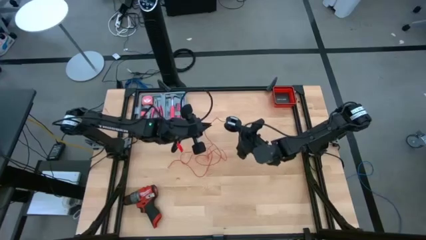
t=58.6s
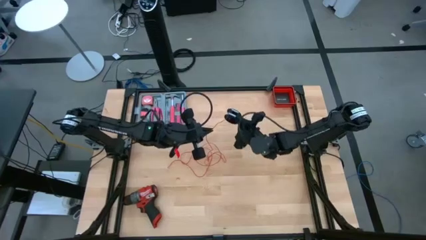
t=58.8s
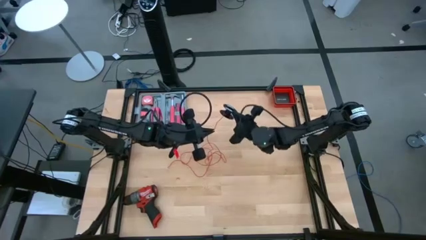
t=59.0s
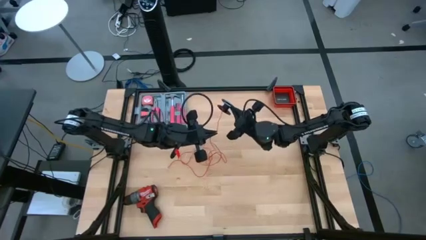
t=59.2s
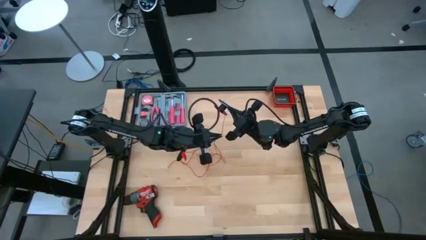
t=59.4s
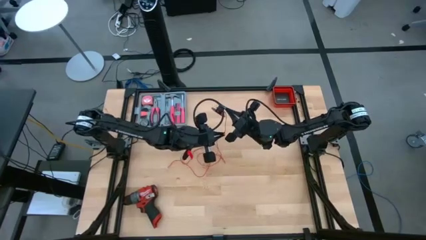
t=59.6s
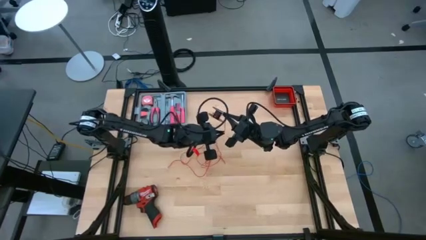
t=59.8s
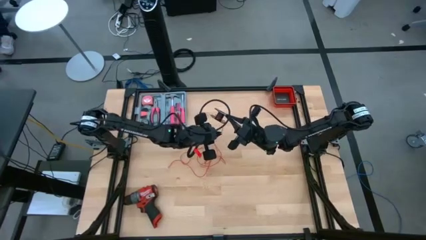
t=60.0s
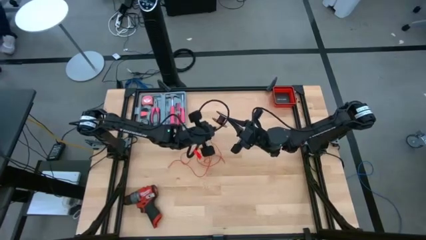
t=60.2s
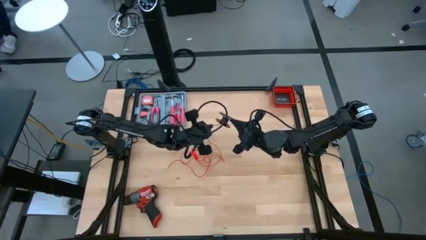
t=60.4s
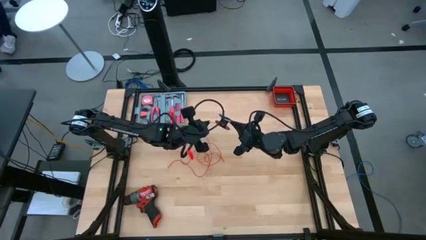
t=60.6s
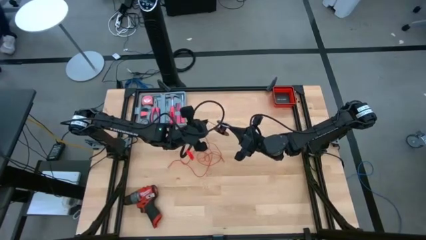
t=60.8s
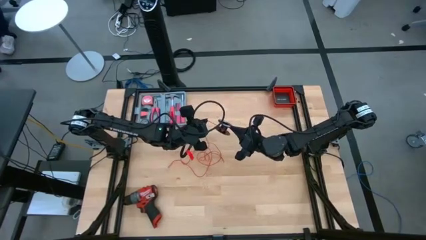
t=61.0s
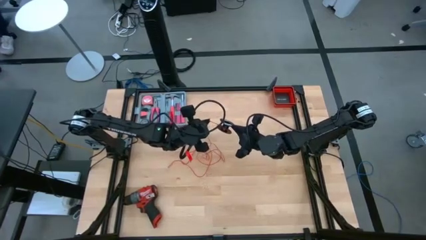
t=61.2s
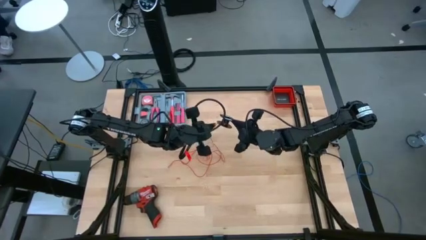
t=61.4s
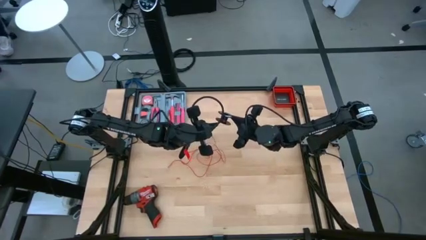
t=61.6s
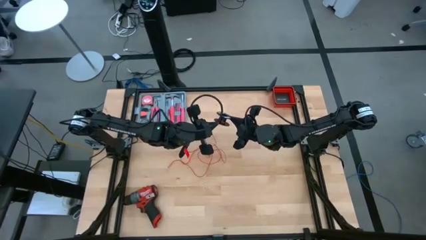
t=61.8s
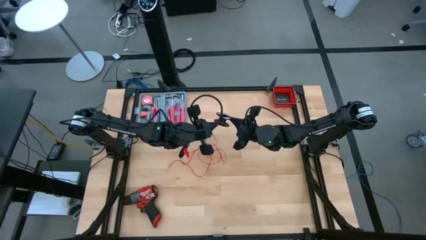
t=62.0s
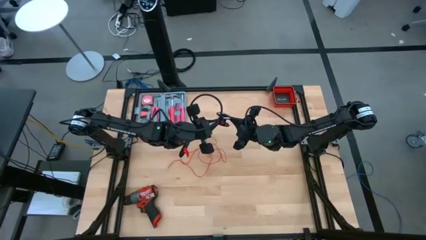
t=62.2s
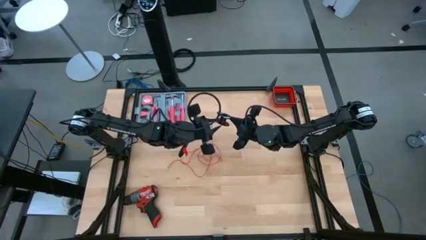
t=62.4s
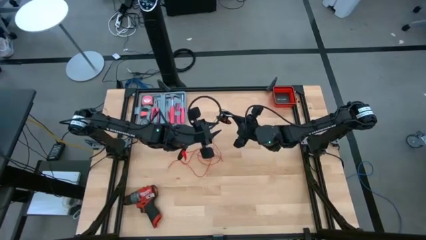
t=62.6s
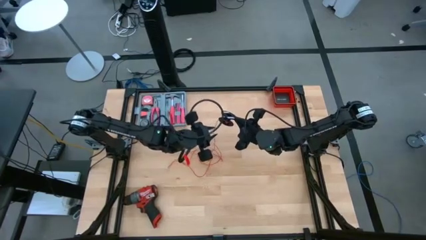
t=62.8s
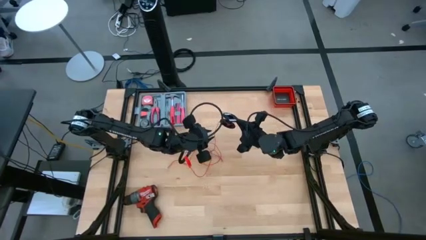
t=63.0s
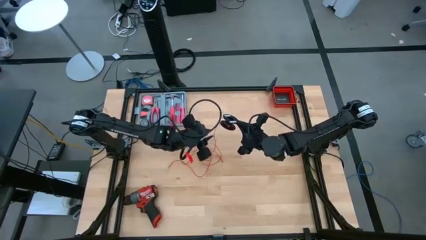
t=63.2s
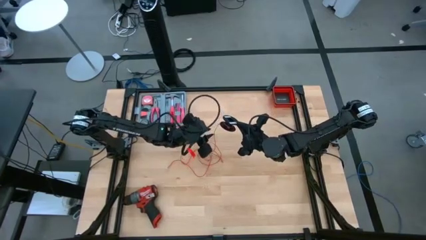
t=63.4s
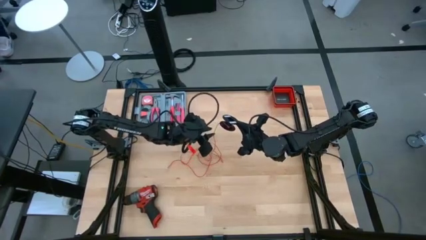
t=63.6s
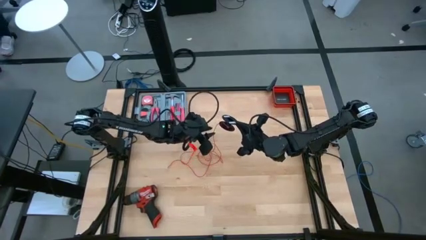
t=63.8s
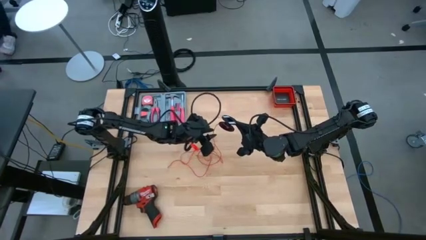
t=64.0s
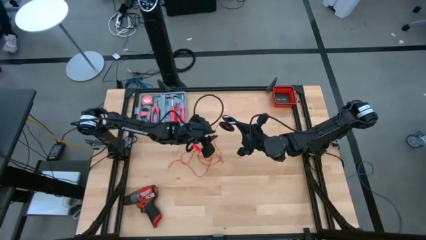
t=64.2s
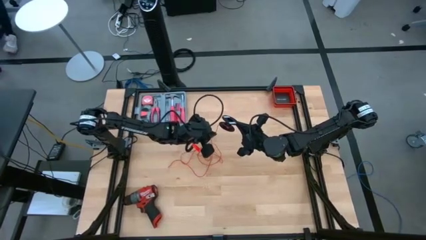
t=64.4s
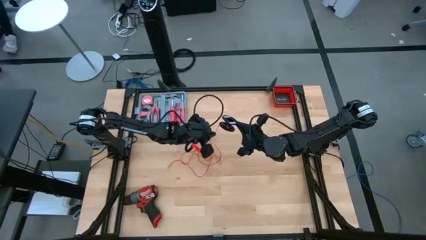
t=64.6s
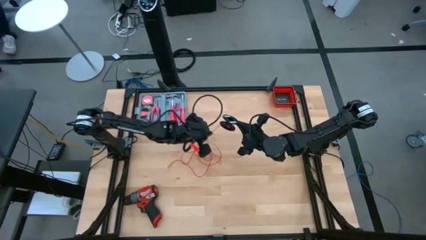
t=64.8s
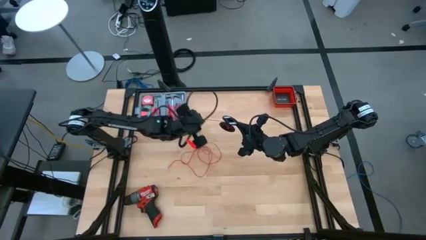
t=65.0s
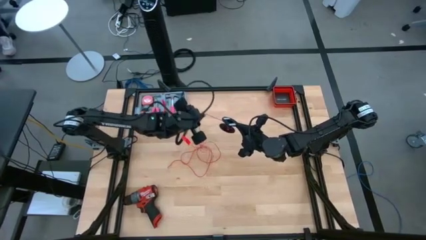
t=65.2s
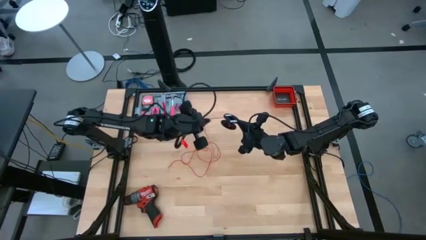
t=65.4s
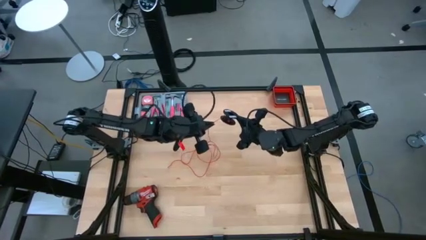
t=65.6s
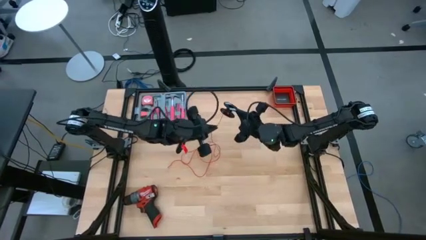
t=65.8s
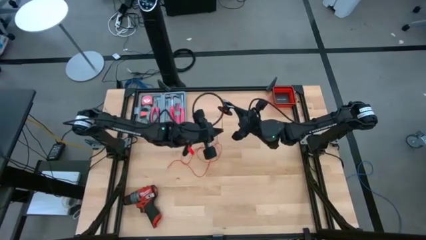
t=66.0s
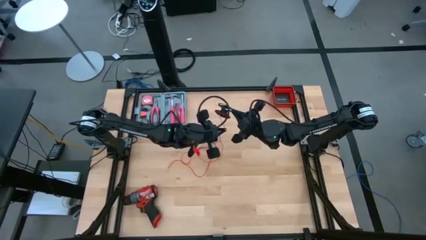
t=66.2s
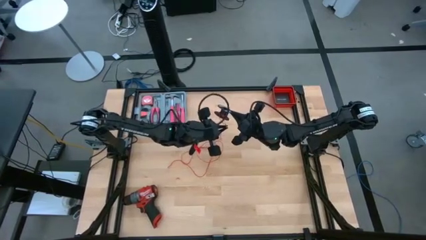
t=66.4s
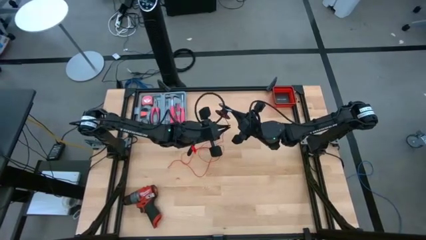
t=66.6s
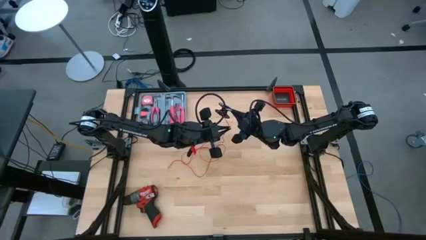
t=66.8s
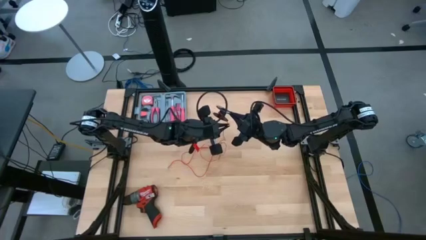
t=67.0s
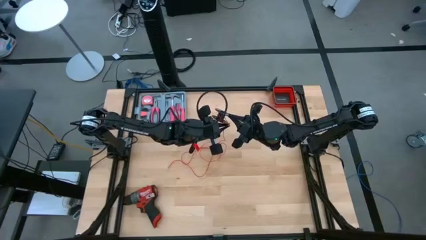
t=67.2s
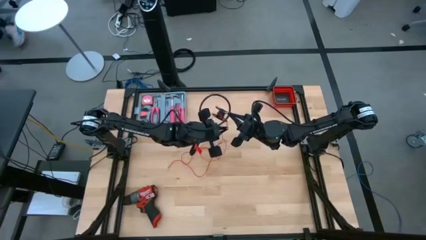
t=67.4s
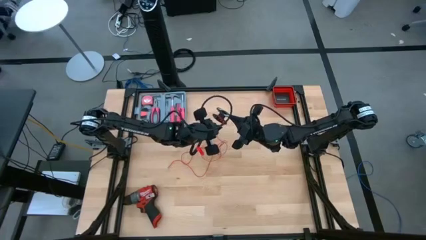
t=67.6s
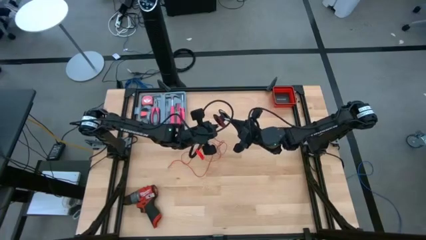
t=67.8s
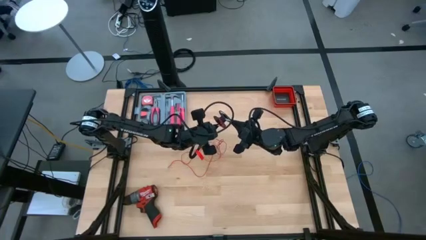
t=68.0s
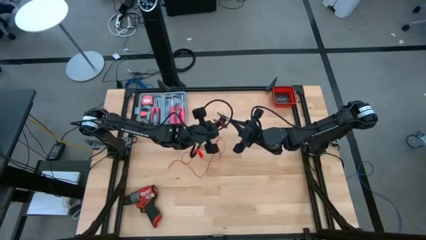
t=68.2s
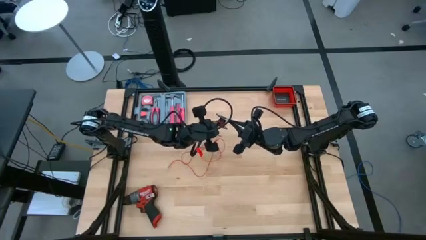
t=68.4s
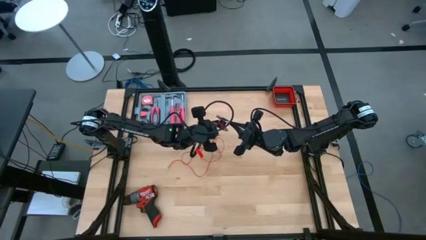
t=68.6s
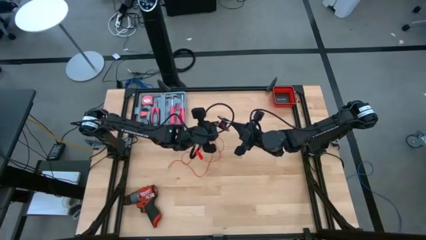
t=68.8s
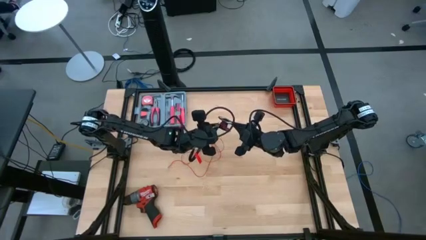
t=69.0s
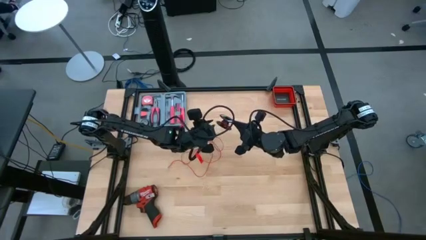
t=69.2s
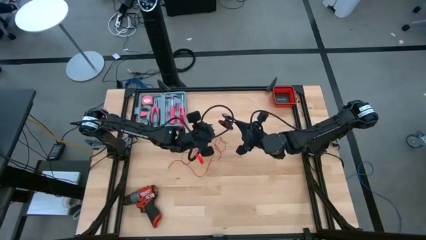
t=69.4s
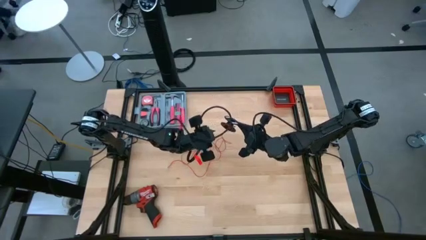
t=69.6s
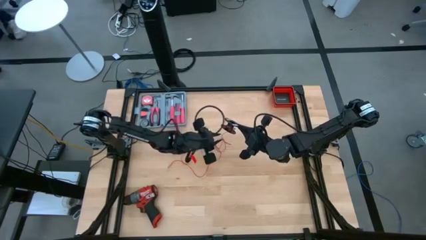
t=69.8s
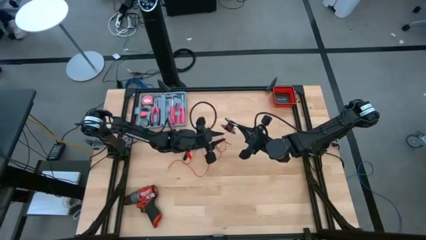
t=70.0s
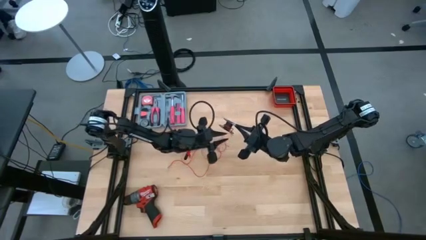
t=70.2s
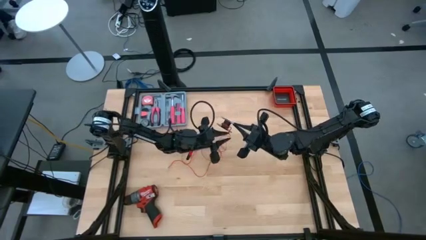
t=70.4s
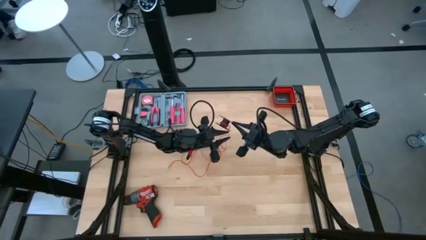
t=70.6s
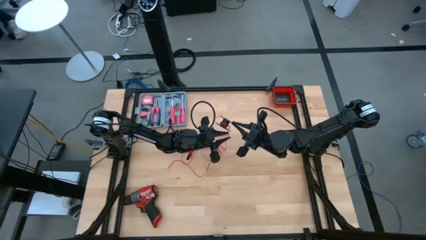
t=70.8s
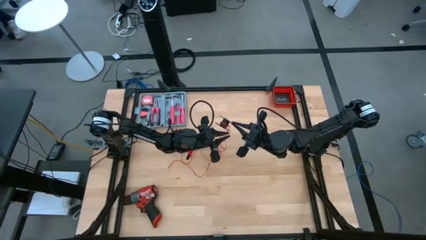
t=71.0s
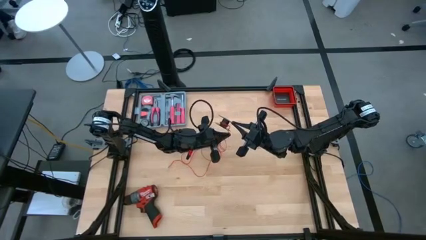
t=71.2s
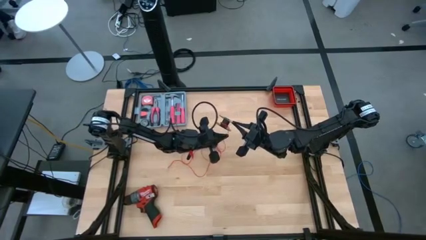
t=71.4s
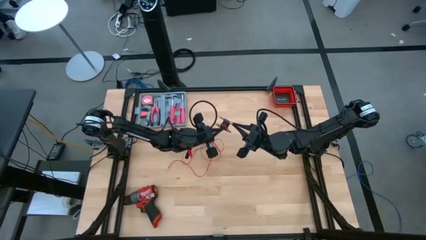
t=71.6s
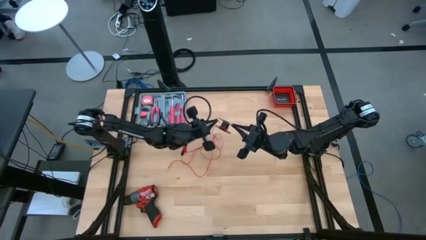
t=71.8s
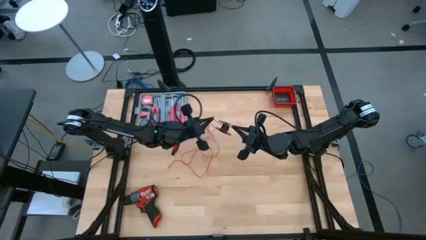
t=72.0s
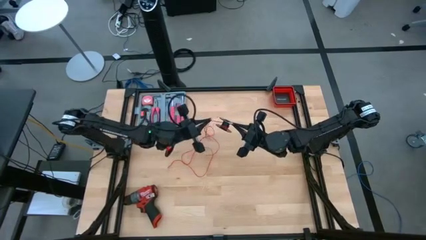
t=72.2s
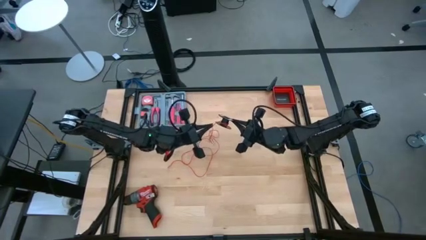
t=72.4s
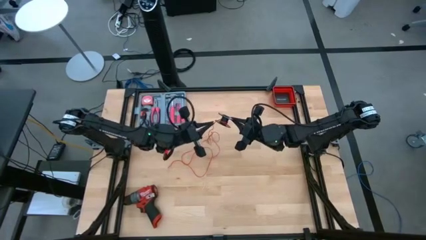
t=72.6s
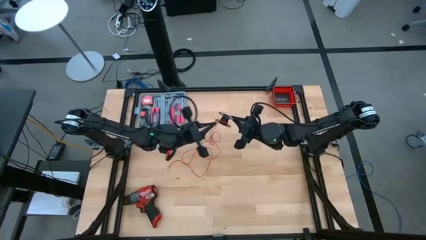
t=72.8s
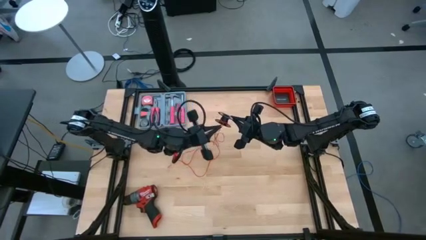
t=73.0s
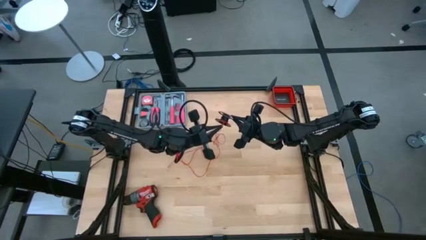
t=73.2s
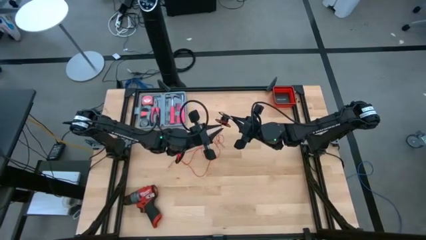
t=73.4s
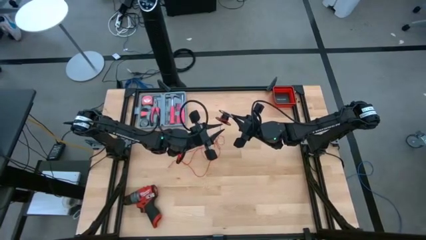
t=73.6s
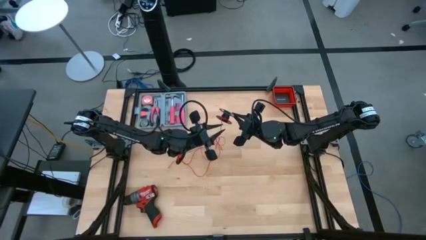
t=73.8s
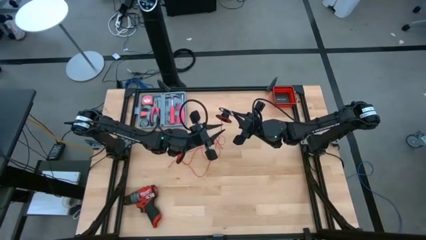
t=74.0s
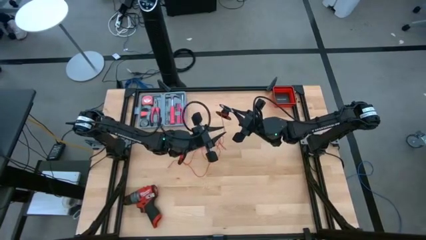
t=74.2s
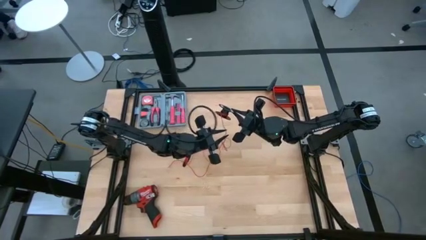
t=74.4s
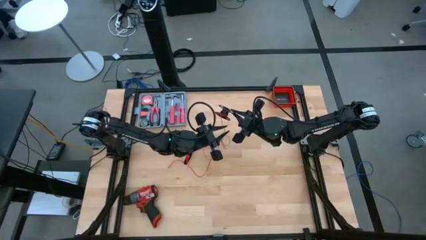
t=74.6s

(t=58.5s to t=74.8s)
Task: Coil cords
Coil the red wire on the black spool
